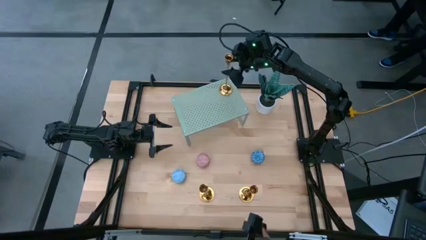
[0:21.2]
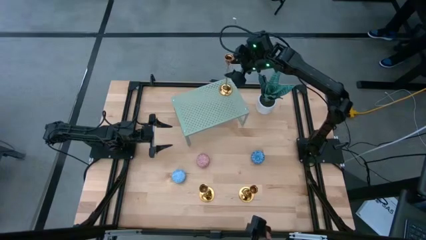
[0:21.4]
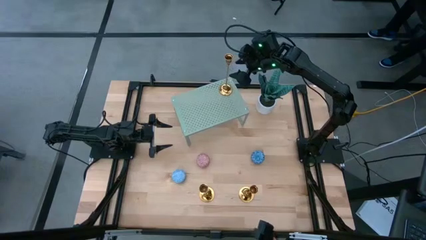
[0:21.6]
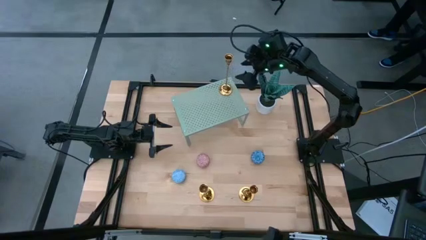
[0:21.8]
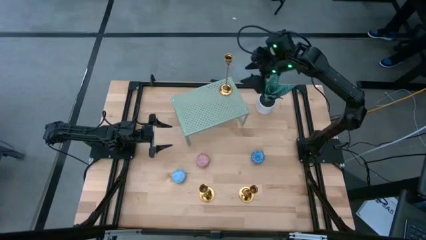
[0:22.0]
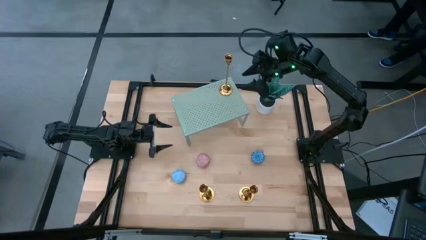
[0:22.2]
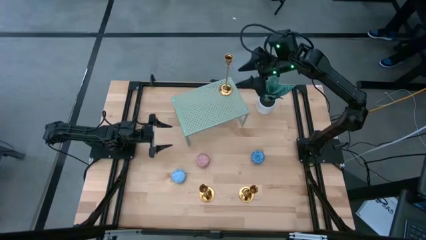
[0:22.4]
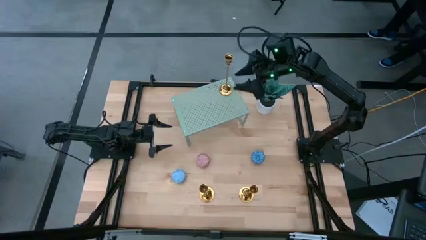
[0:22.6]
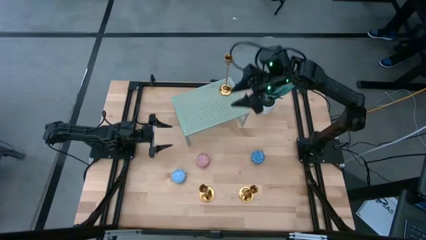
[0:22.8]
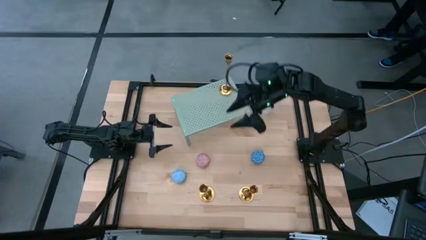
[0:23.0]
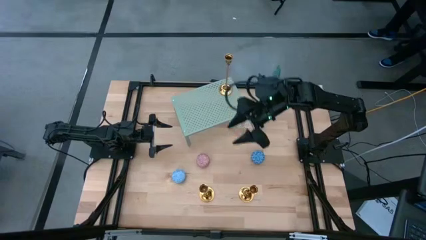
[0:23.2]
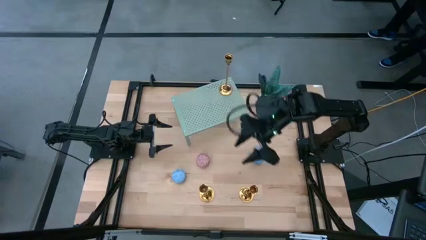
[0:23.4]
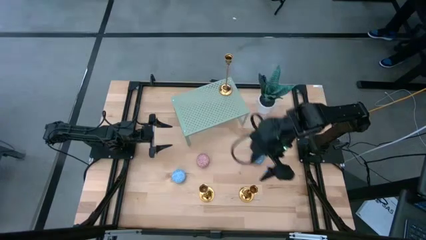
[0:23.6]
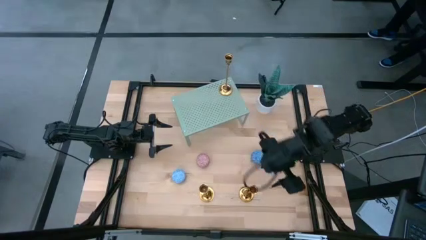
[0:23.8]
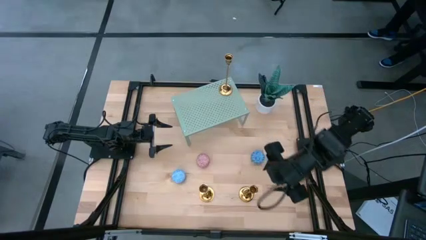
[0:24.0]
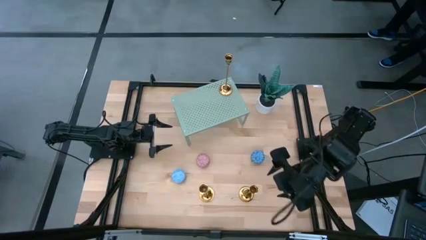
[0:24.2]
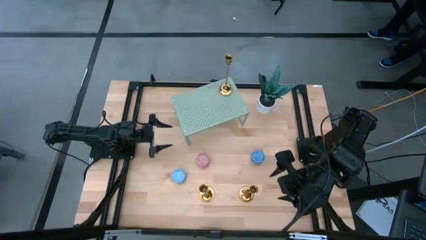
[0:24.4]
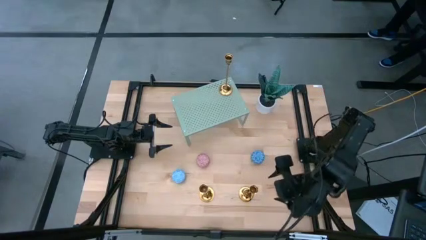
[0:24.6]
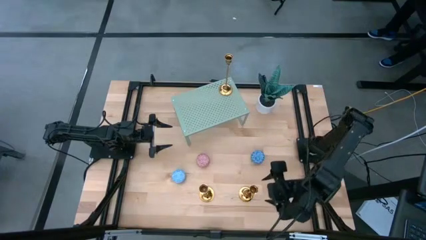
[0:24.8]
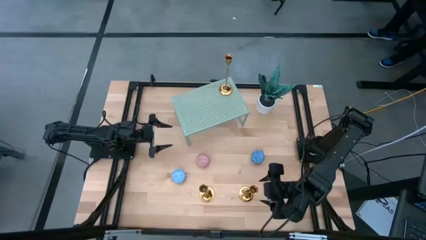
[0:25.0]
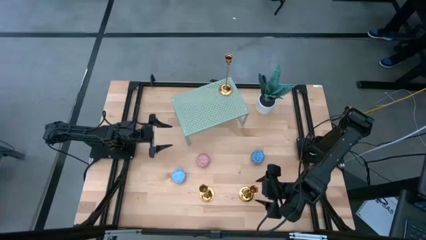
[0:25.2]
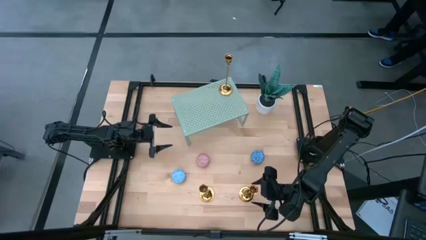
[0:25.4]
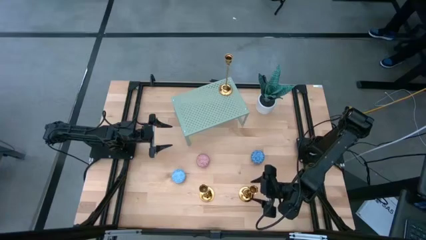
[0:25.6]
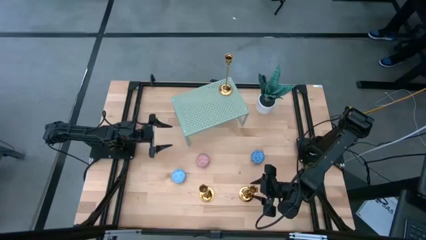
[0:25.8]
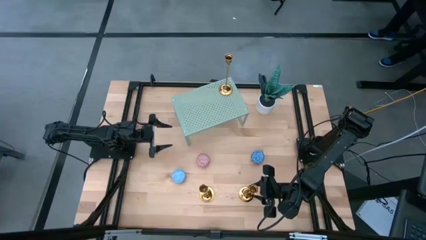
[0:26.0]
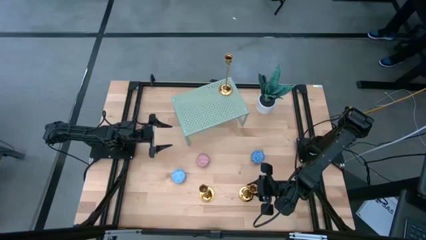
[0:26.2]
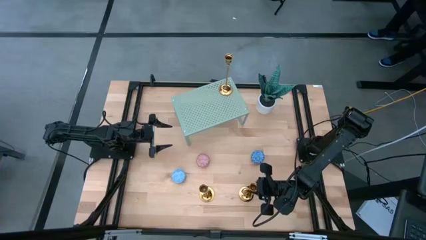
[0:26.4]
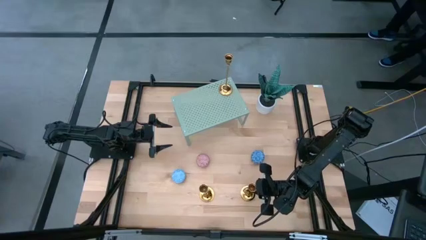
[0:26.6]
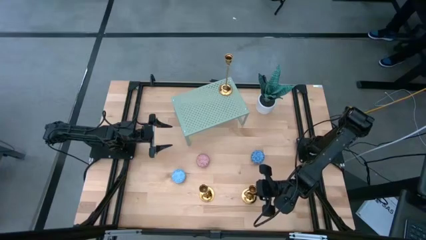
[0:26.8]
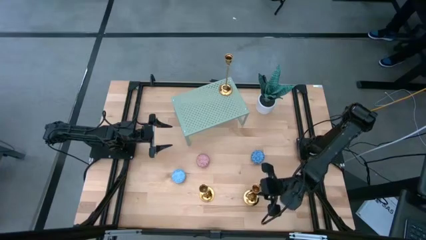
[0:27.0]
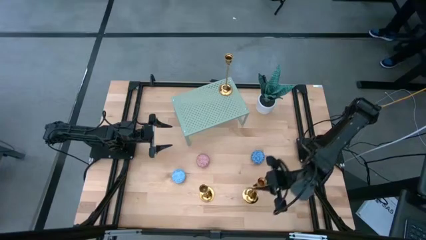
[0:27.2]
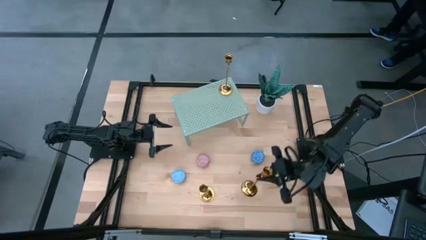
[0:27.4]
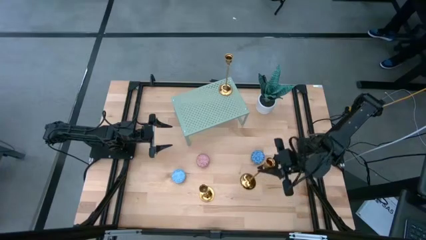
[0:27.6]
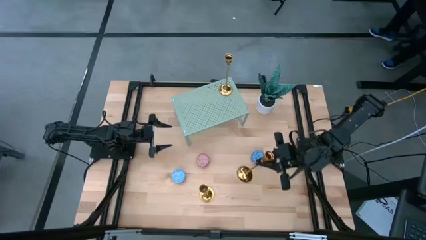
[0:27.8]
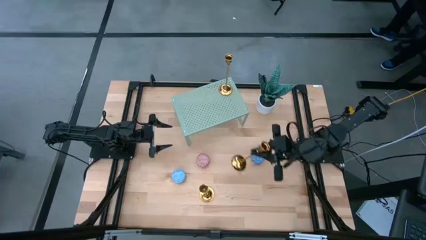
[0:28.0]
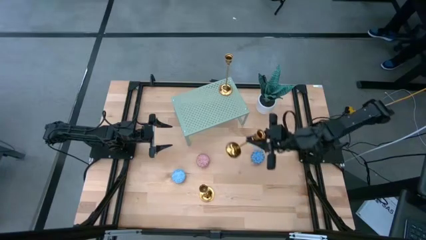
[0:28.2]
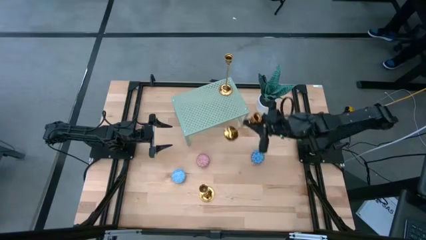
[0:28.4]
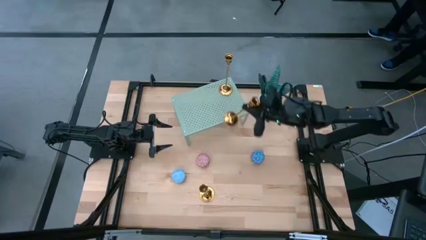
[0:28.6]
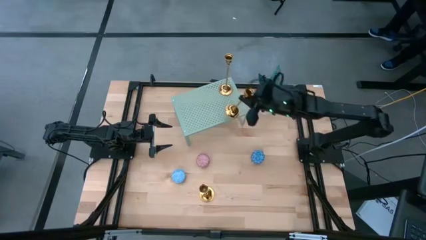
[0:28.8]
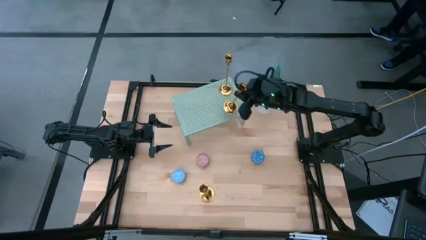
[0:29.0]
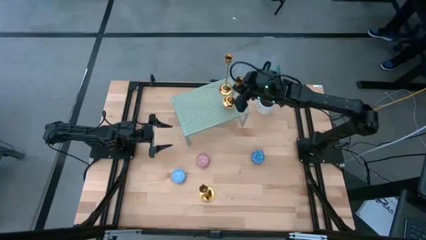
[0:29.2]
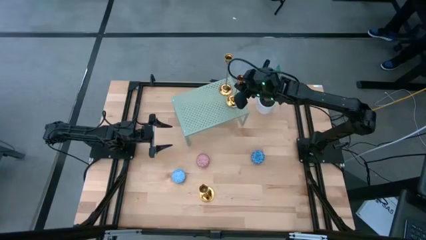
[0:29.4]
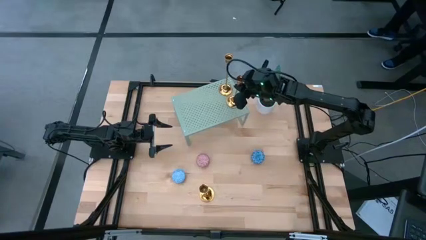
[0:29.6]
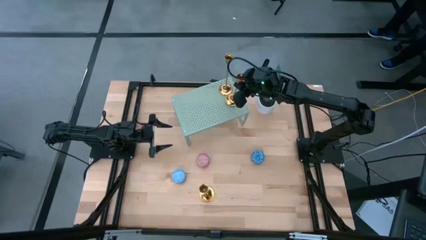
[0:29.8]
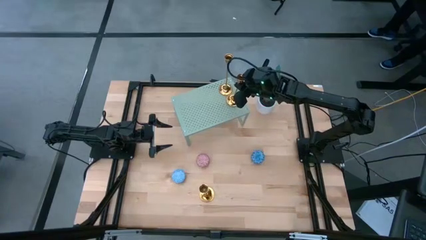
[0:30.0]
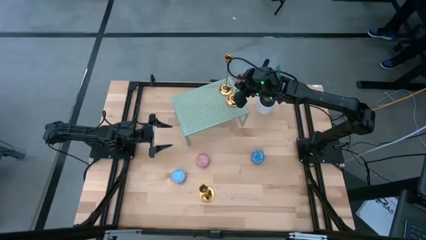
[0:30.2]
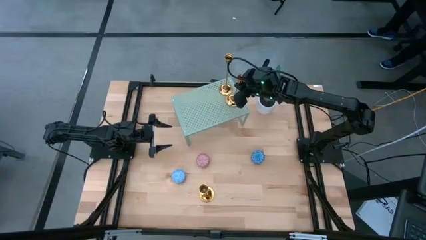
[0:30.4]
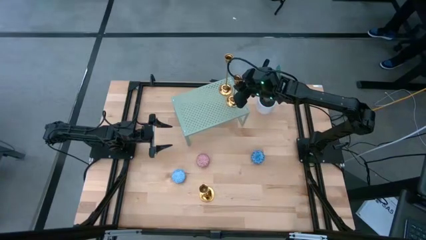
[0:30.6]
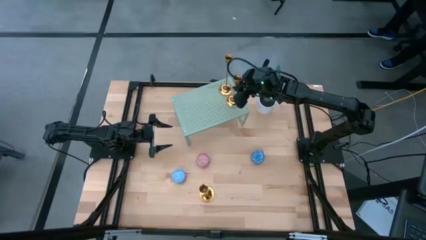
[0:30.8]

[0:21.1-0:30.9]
Task: Pick & Place candle stick holders
Put the right gold candle holder on the shelf

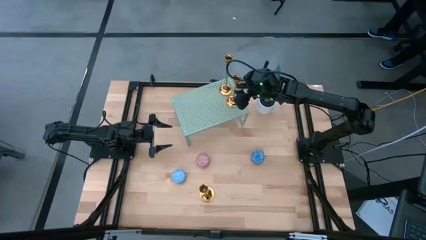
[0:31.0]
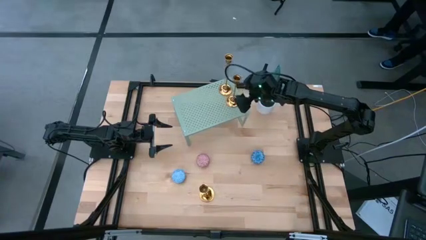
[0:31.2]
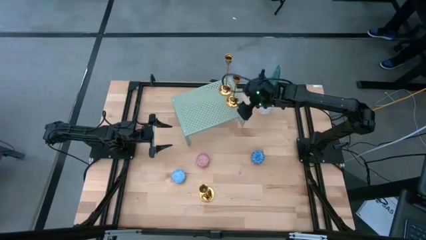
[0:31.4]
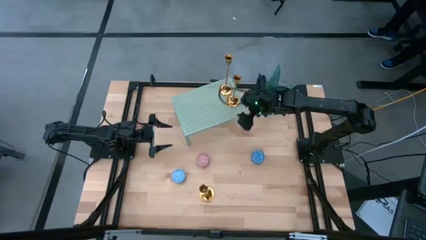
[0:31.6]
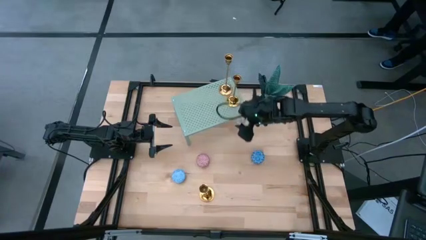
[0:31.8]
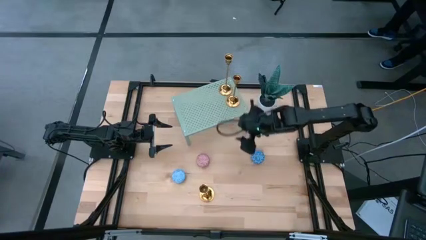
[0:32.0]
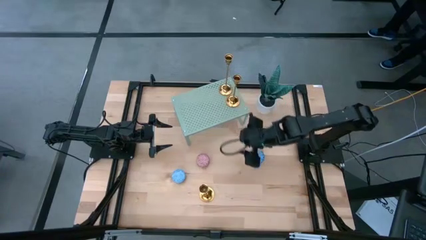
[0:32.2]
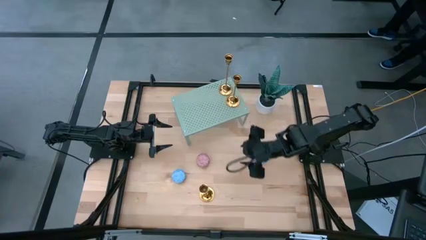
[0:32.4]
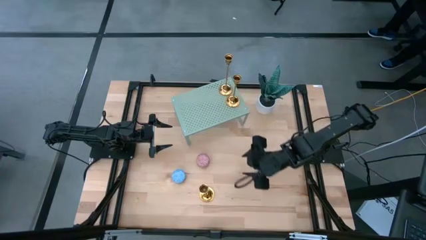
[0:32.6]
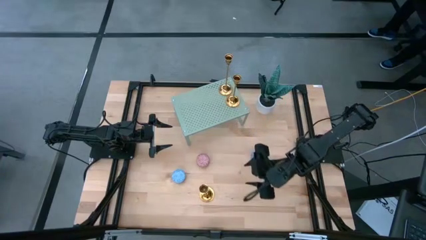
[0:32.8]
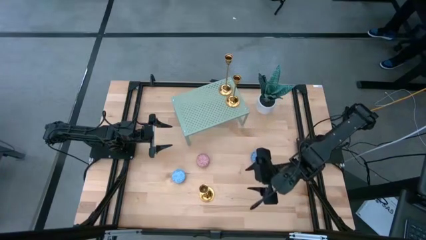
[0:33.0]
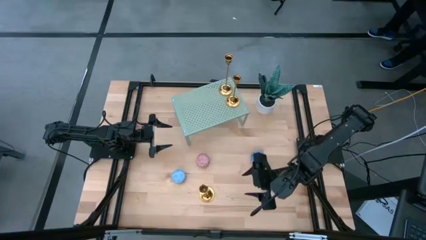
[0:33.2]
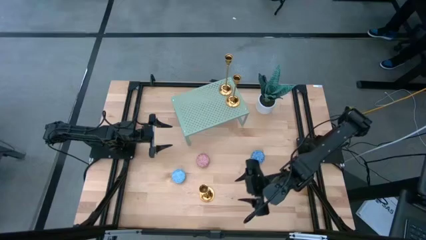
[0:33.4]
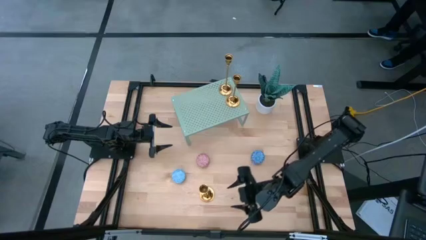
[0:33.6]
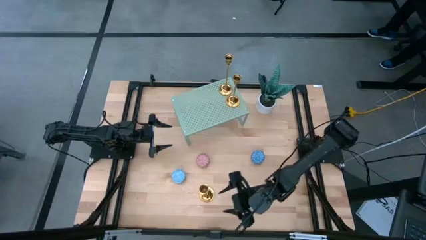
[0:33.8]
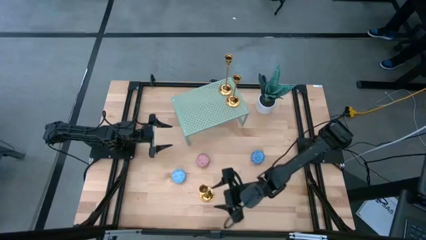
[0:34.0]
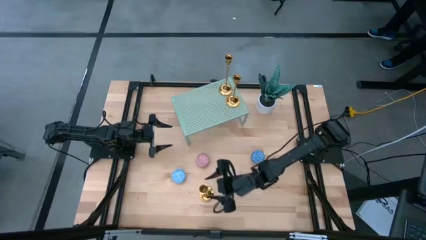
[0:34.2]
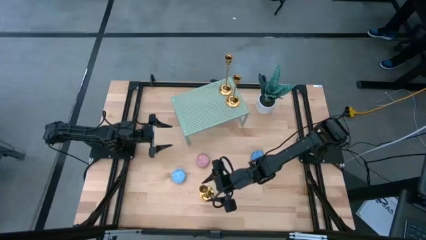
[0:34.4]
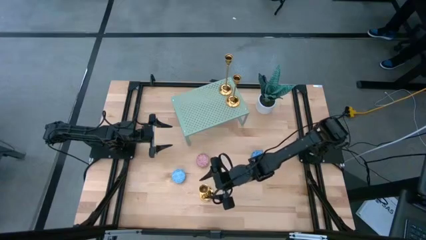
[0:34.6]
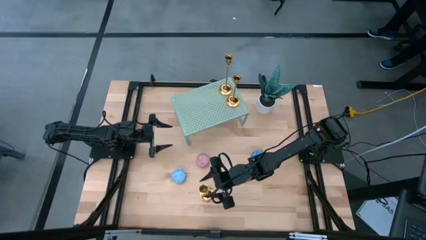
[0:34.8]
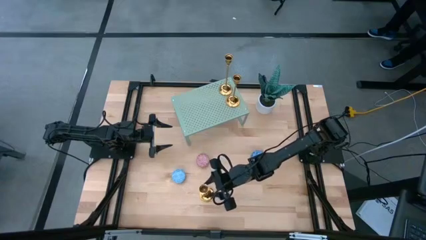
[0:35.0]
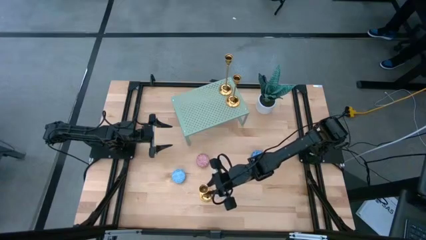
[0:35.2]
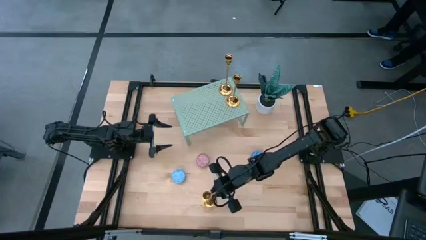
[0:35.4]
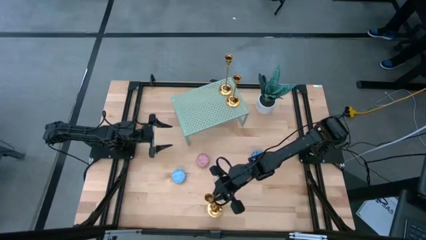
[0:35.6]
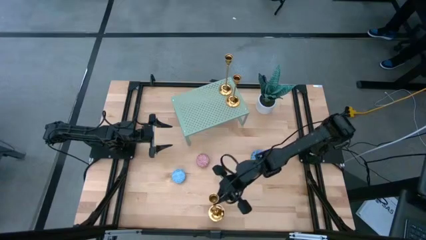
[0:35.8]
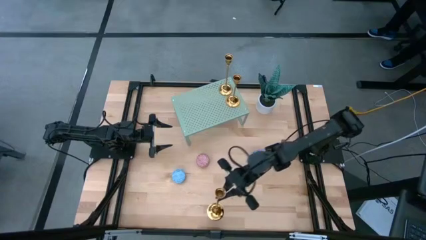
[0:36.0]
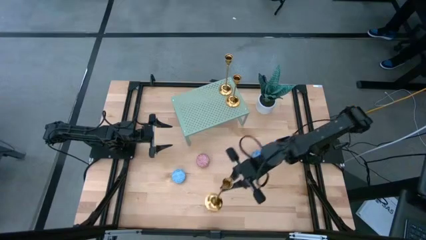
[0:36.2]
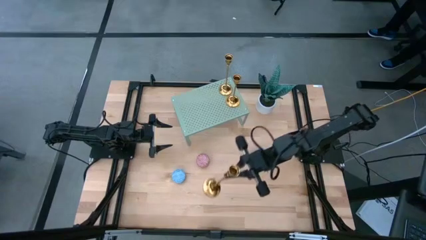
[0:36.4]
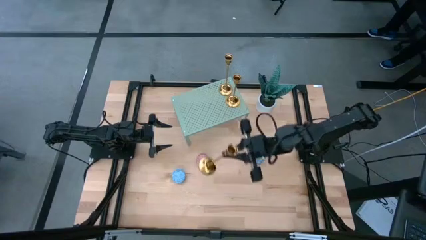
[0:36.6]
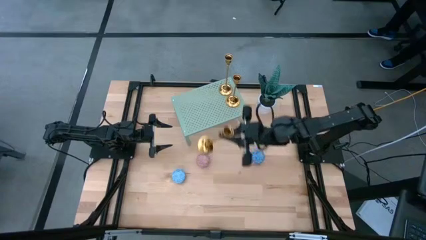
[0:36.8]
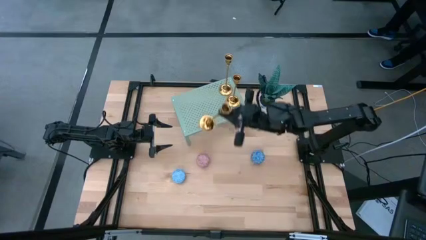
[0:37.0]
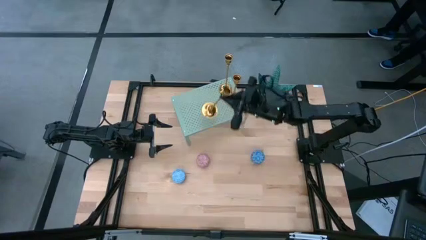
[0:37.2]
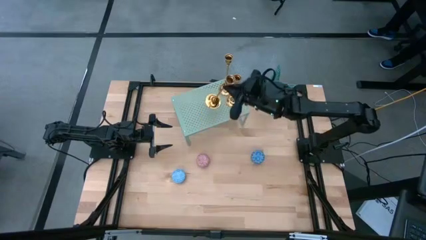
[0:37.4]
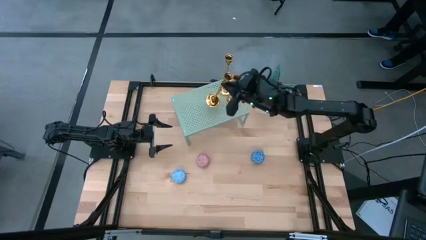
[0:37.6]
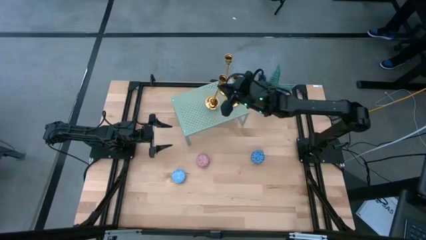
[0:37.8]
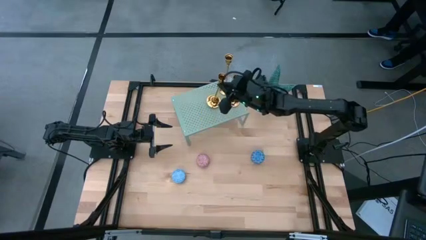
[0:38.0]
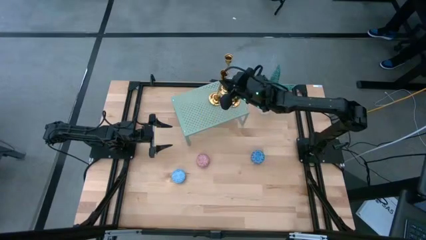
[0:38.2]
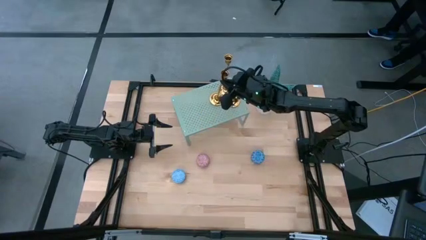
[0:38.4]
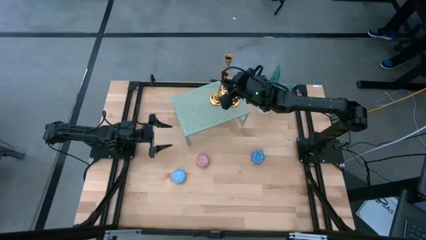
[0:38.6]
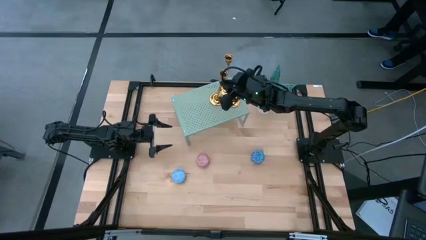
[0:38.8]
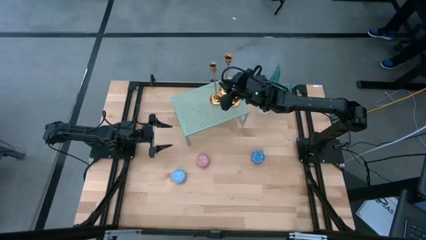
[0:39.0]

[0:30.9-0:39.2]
Put the gold candle holder on the shelf

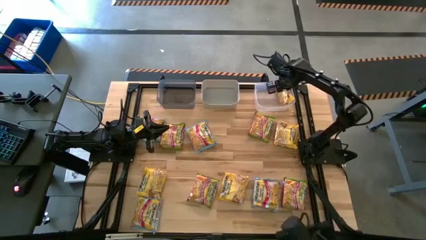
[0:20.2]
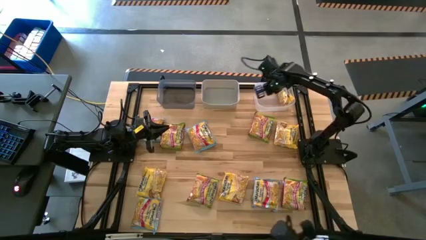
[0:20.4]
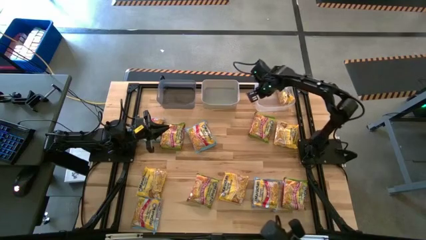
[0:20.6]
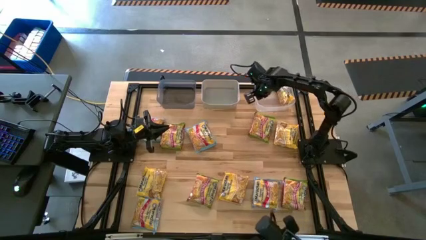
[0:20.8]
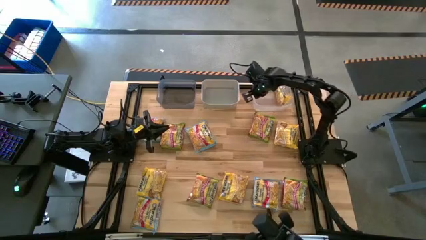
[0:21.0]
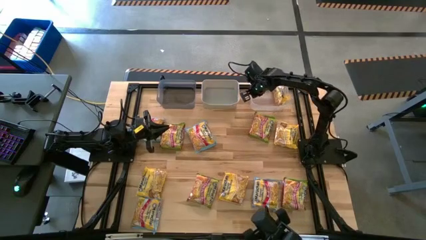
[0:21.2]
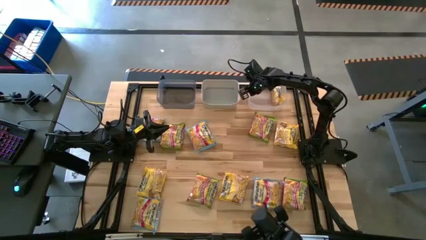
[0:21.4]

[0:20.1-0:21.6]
Task: Sort Maruchan noodles
Adjust the transparent bin on the table
